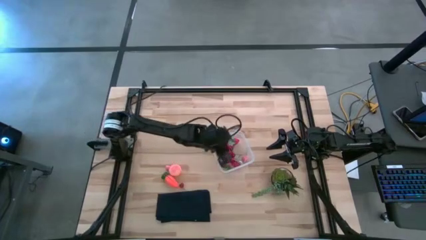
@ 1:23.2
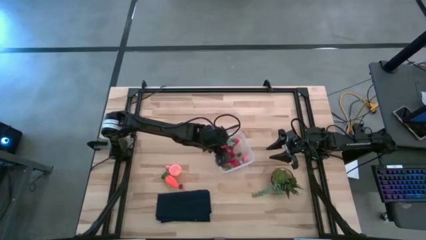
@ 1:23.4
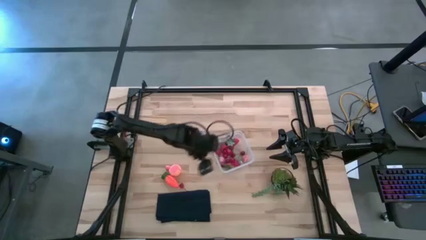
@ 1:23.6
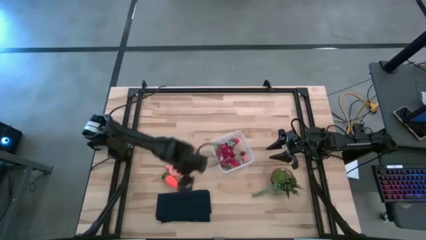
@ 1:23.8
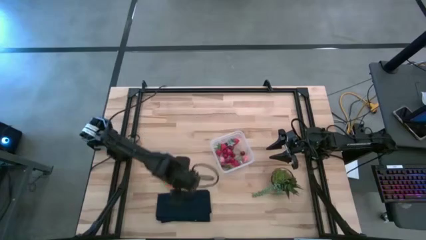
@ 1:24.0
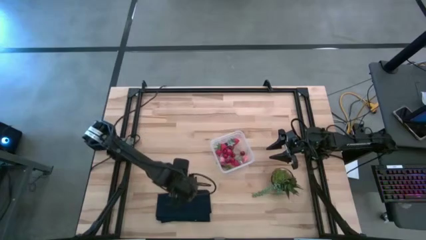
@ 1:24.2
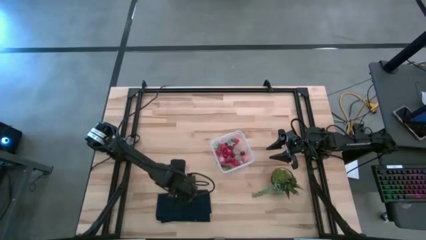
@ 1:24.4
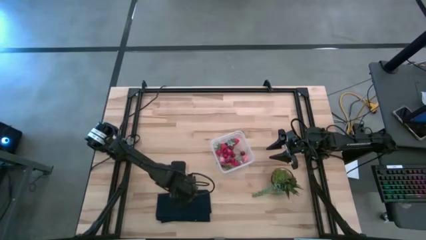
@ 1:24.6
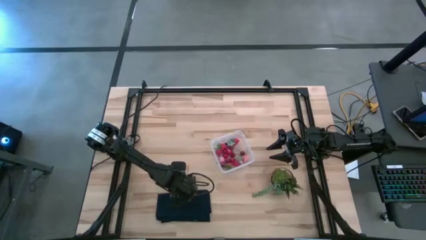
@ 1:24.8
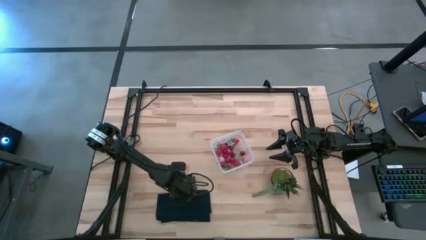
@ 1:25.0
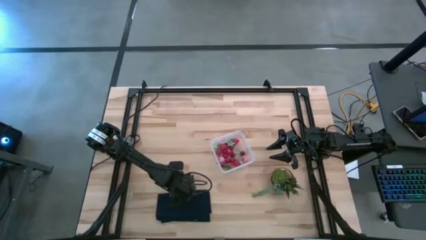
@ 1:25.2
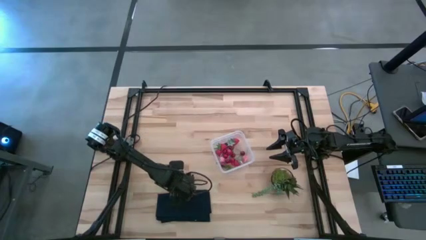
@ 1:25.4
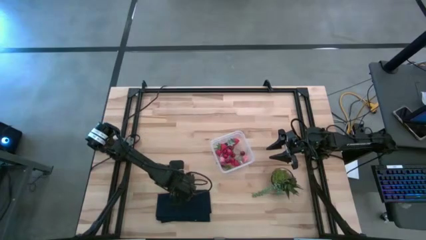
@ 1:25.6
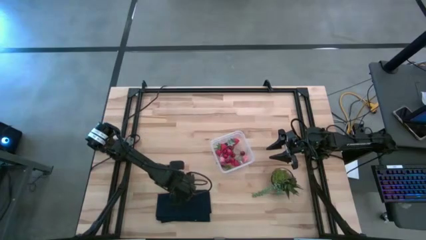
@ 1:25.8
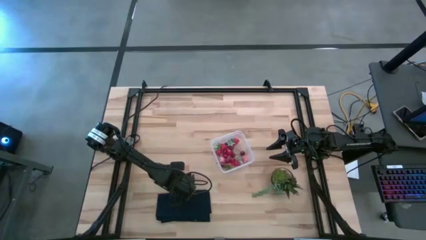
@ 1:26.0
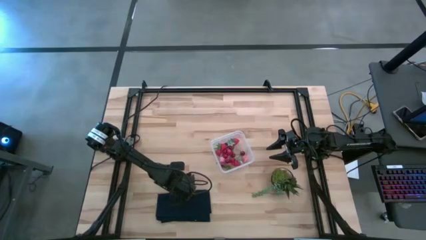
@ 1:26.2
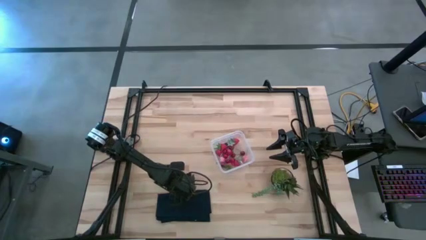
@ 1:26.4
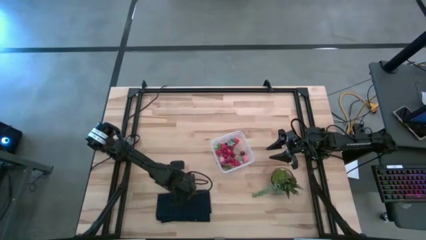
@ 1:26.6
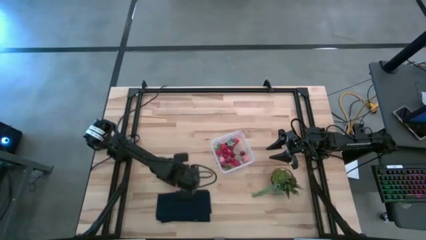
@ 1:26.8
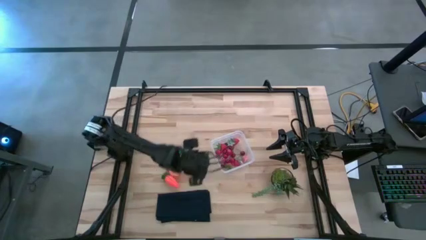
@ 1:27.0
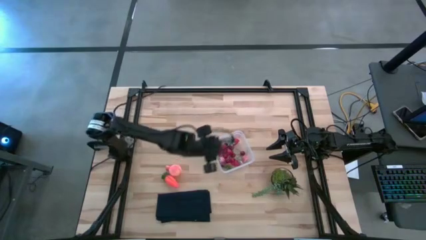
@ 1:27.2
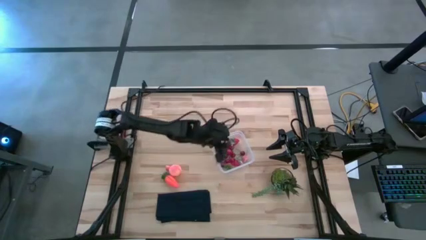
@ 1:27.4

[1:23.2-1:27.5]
Task: Pick and placing Produce into tupperware
Put the red cherry into the container

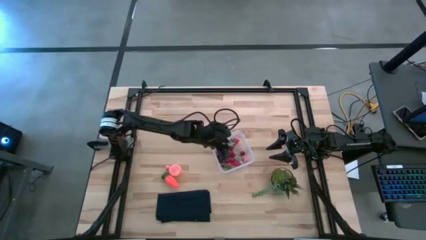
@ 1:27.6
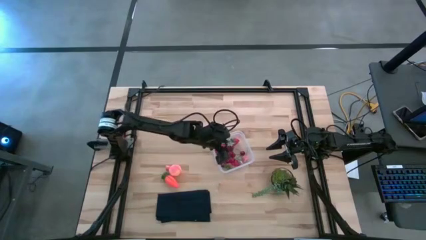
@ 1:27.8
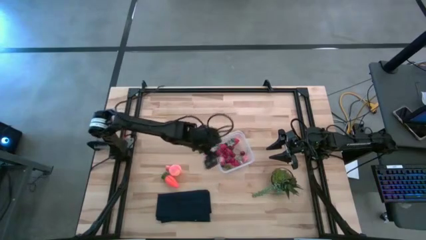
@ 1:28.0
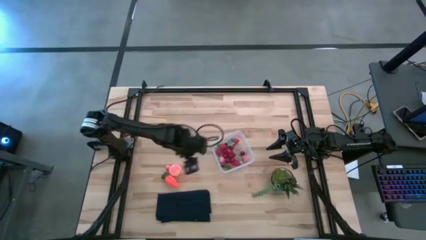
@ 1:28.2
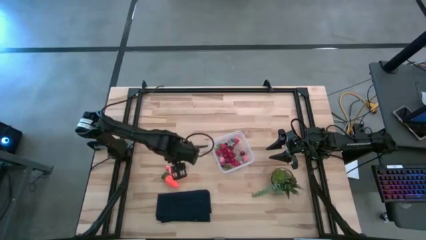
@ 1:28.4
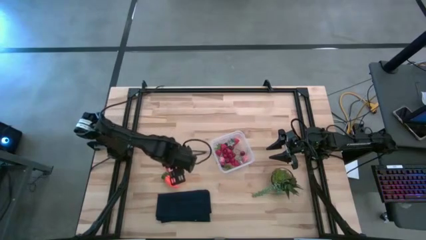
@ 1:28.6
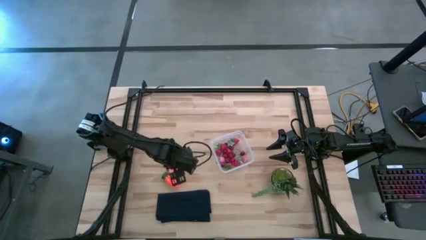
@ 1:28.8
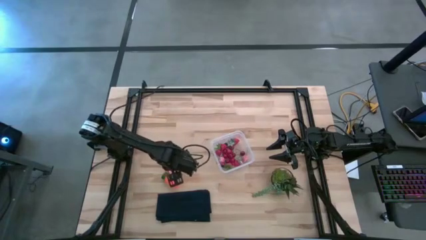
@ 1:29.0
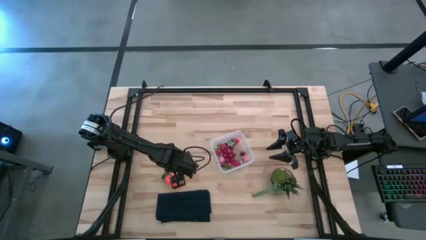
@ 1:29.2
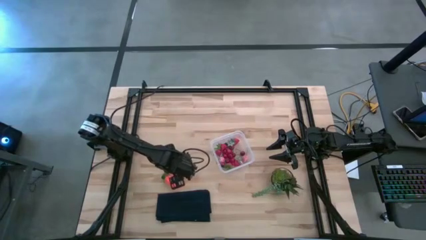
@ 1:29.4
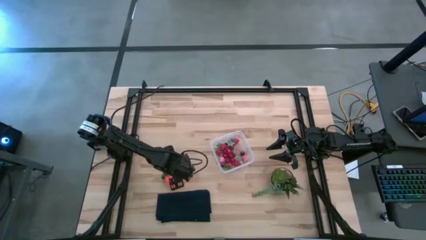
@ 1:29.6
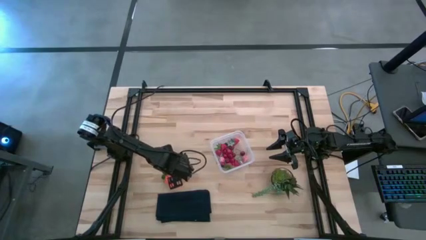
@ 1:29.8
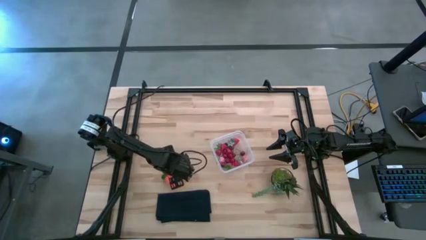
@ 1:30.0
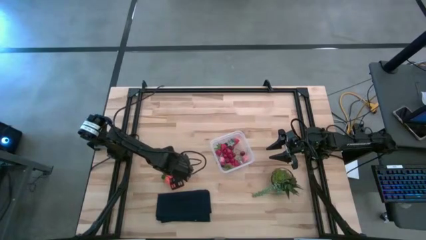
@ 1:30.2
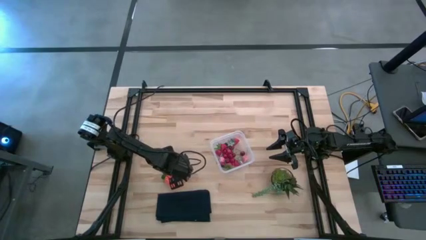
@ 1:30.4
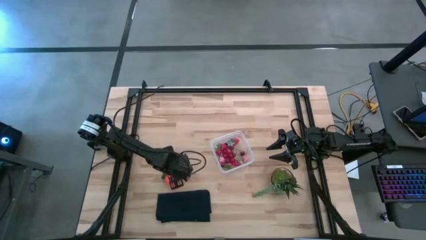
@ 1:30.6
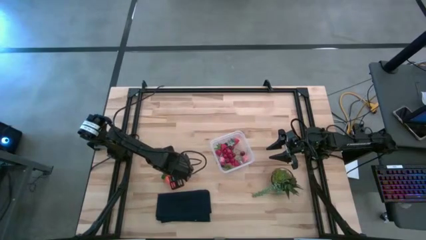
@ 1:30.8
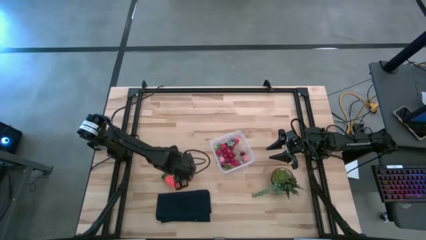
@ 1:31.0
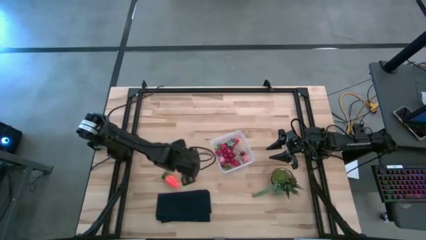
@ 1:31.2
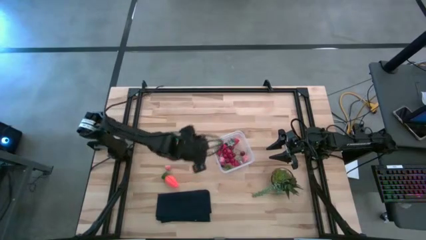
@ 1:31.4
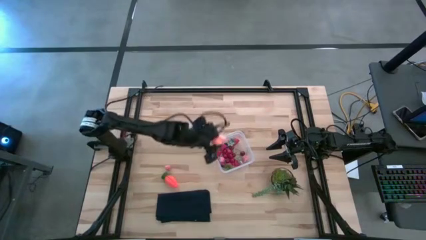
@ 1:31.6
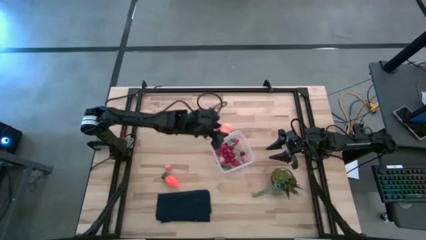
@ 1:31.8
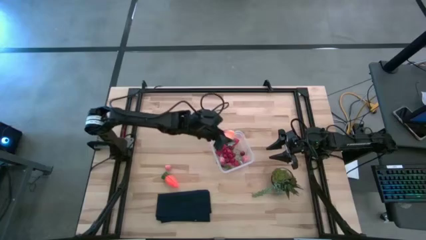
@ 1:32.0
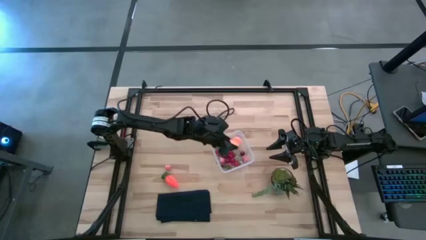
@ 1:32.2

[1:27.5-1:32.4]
Put the light pink peach into the container

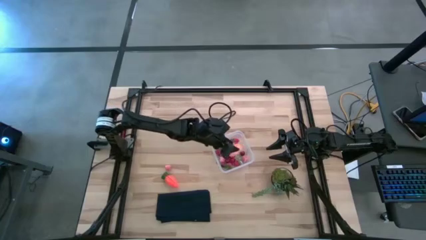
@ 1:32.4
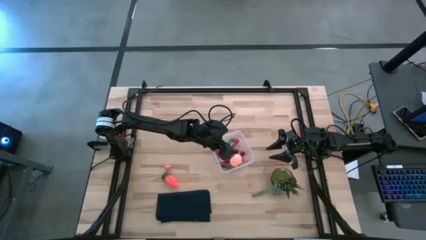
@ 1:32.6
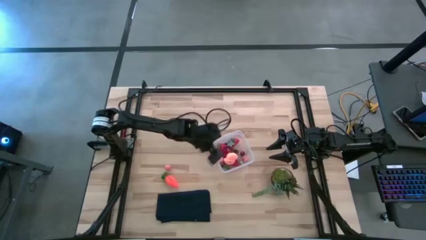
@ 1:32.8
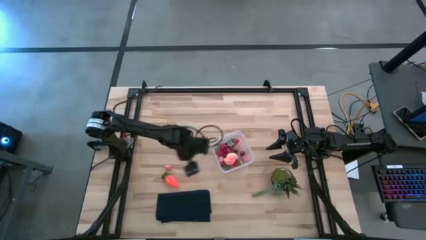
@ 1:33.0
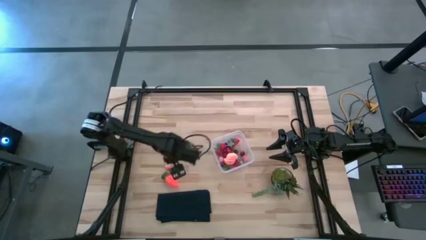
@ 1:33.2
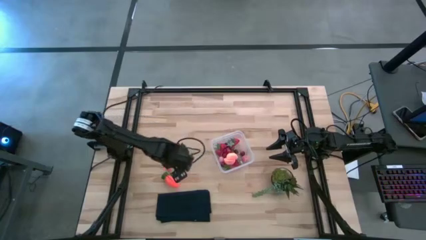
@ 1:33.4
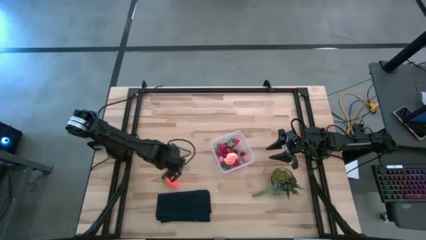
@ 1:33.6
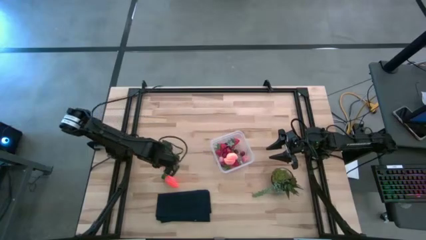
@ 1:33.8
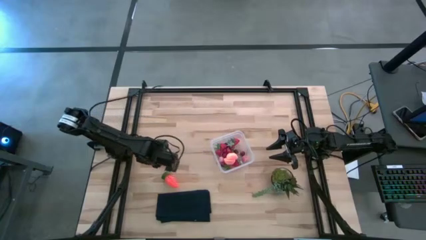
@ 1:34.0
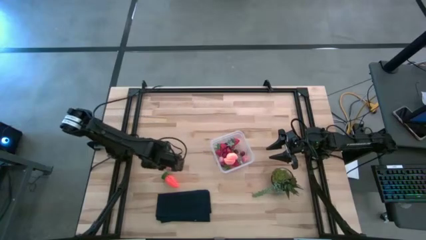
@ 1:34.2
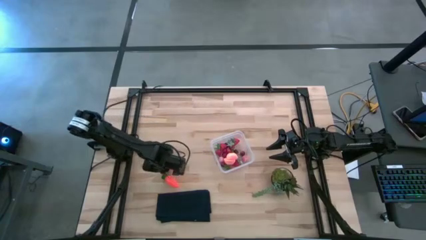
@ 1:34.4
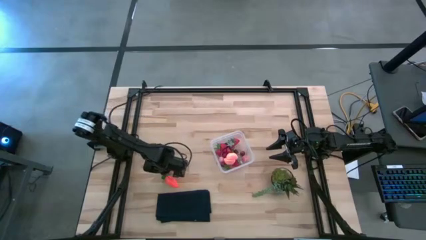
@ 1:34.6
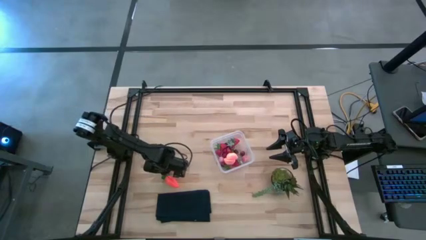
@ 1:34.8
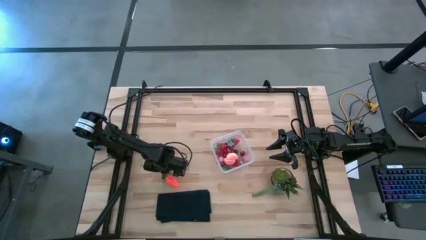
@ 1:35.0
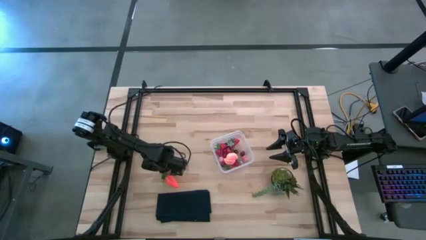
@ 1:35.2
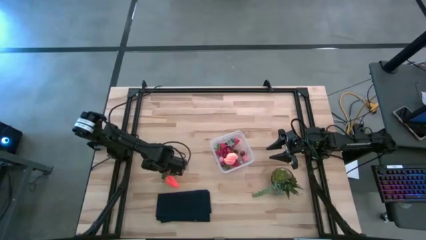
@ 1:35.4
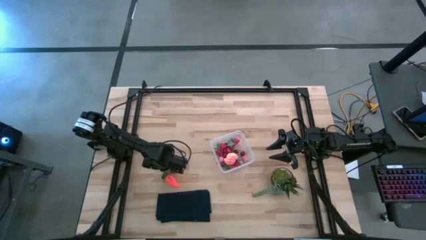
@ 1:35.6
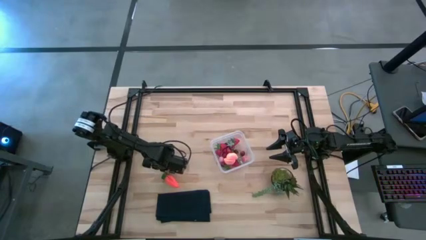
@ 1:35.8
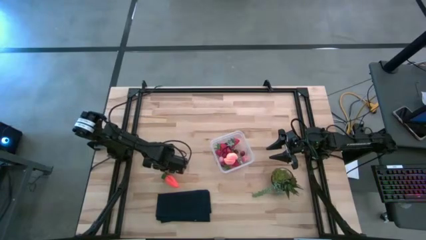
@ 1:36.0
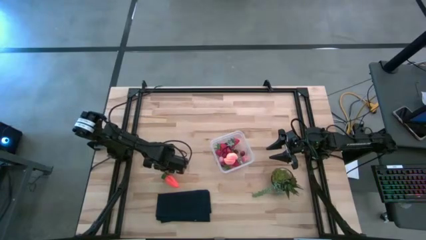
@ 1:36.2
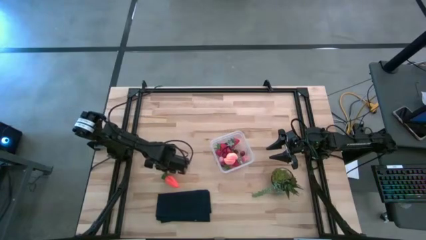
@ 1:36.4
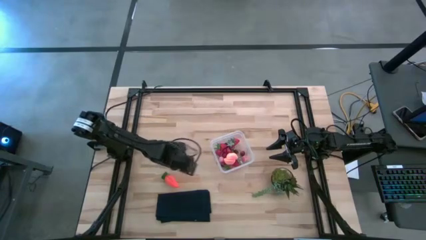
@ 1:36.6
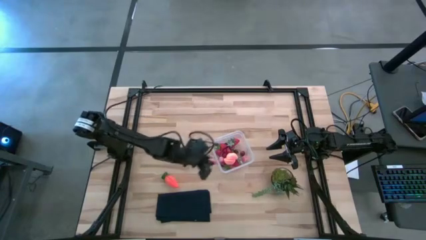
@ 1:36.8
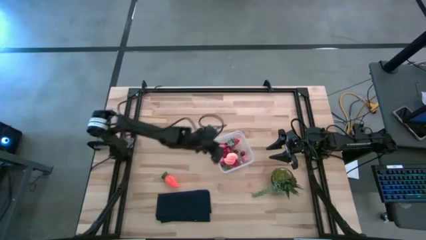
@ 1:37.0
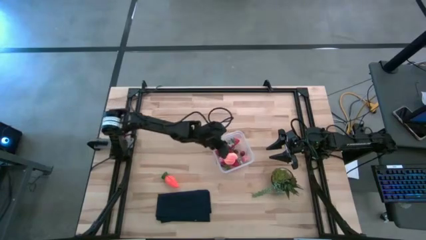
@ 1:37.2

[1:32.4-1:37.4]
Put the pink peach into the container

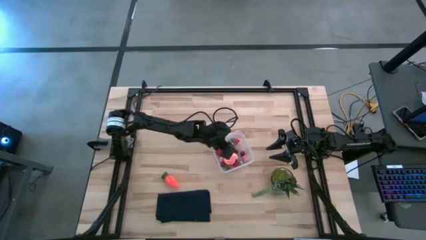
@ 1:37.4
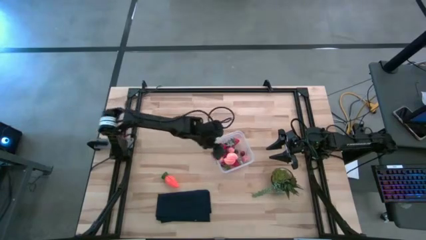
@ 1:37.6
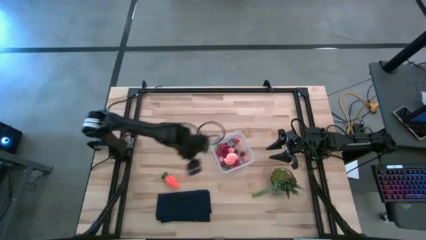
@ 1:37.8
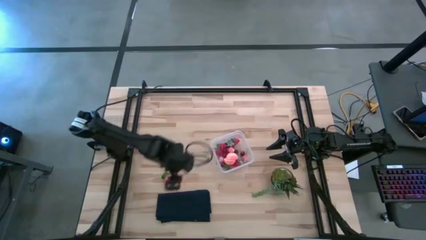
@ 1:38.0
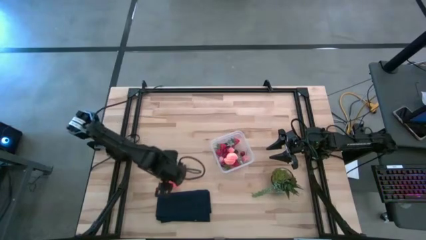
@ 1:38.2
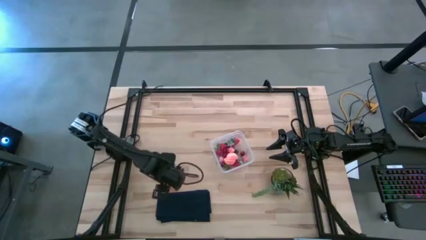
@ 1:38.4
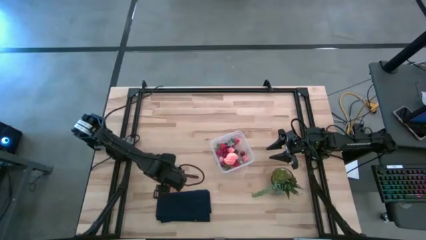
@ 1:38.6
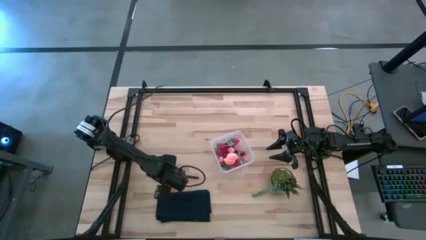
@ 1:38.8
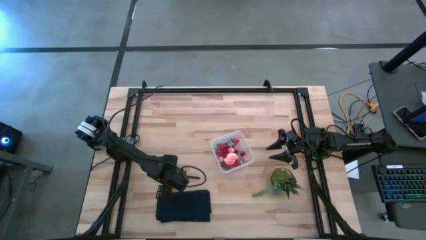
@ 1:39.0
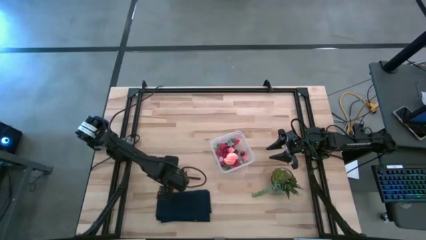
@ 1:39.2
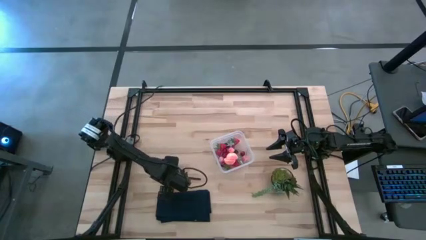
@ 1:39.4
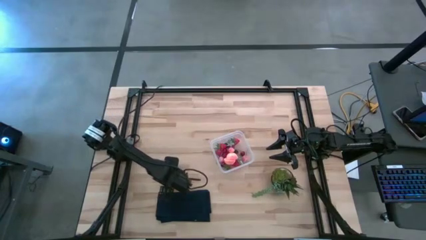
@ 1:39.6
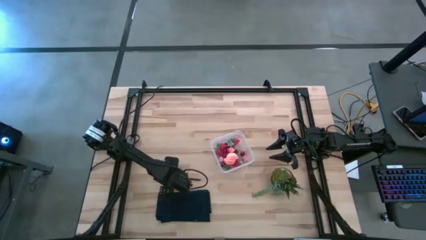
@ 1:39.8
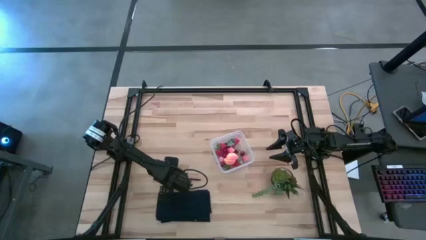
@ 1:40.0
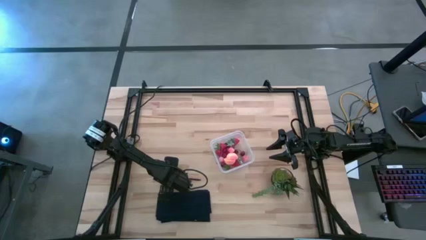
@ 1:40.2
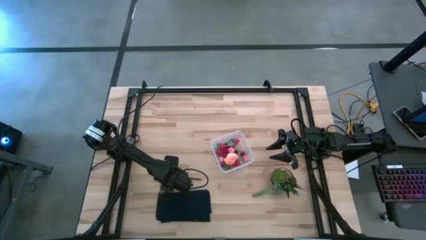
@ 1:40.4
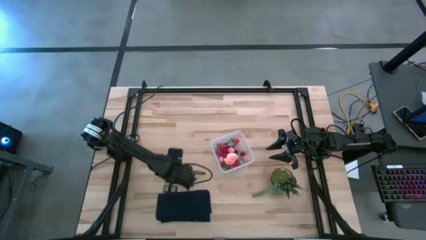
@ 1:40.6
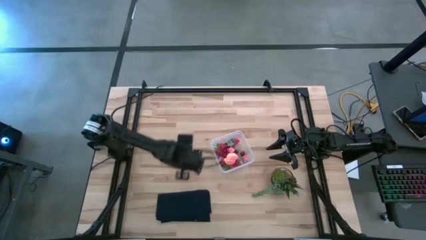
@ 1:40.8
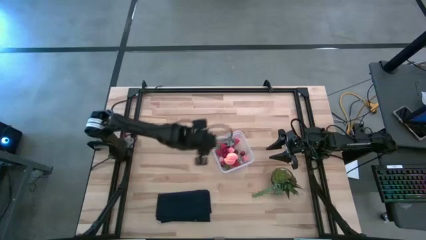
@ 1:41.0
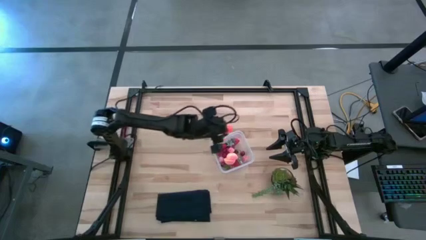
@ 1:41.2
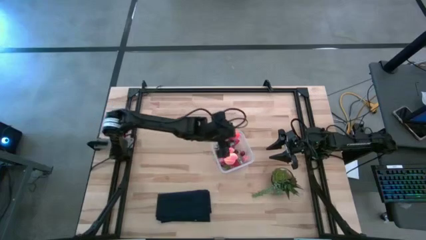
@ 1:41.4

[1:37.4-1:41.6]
Put the orange carrot into the container
